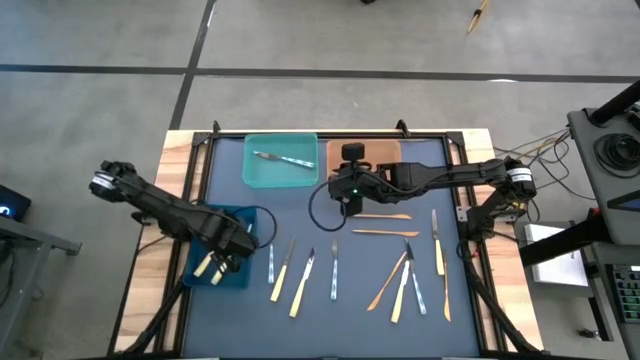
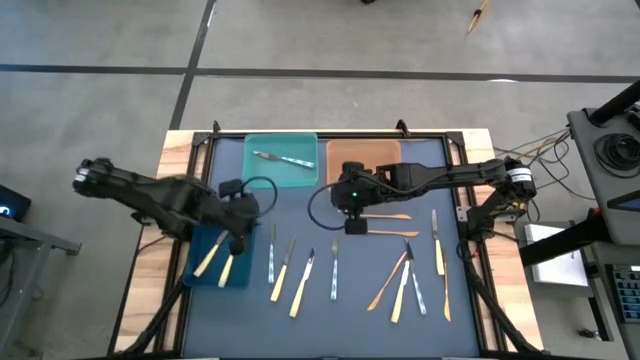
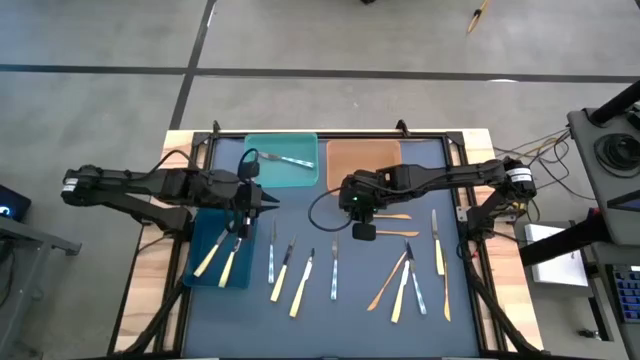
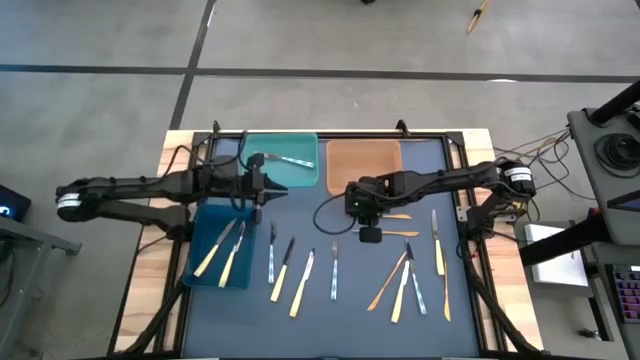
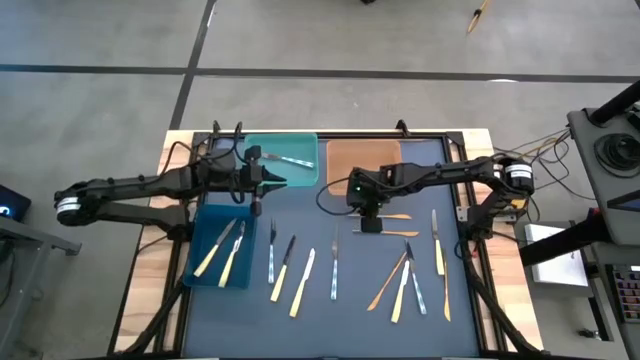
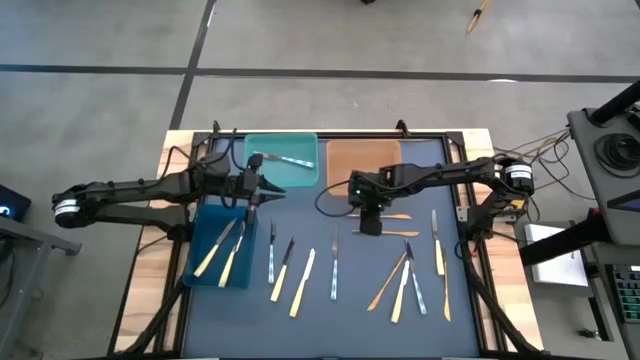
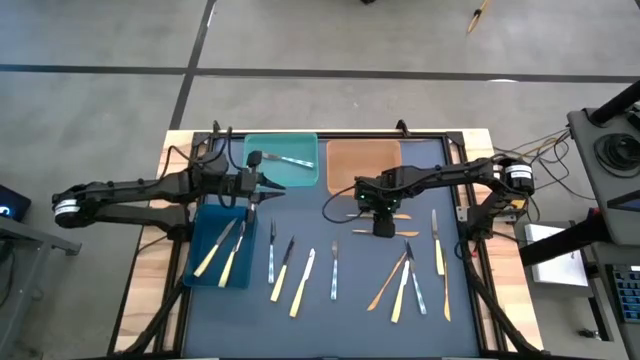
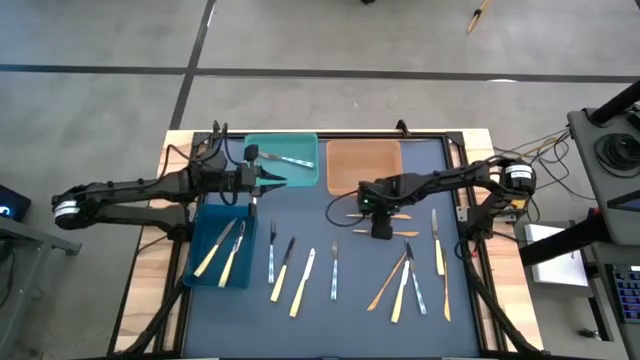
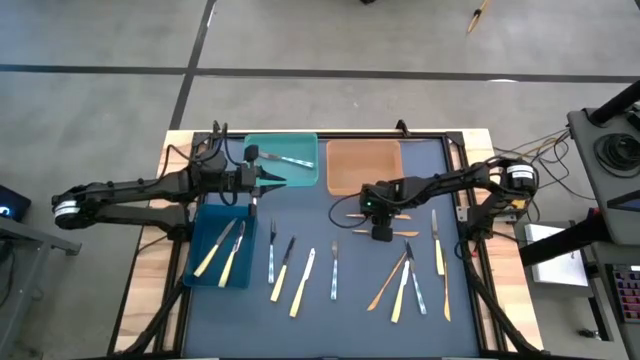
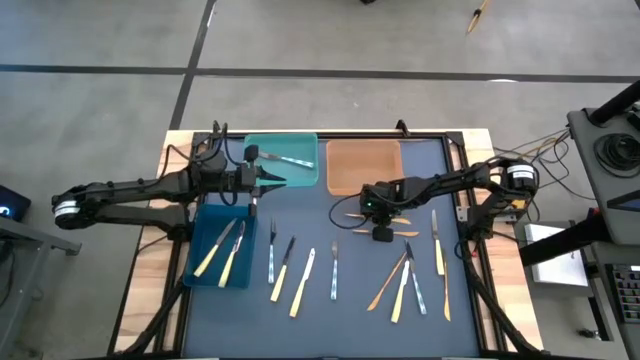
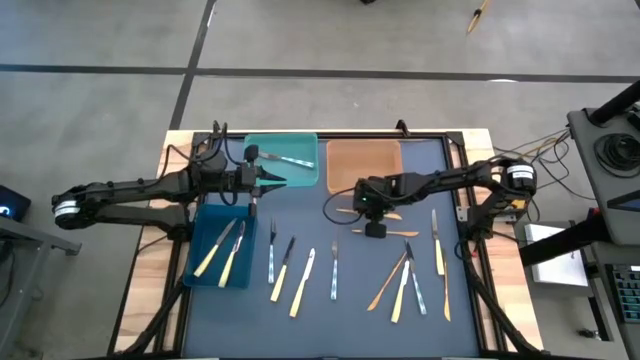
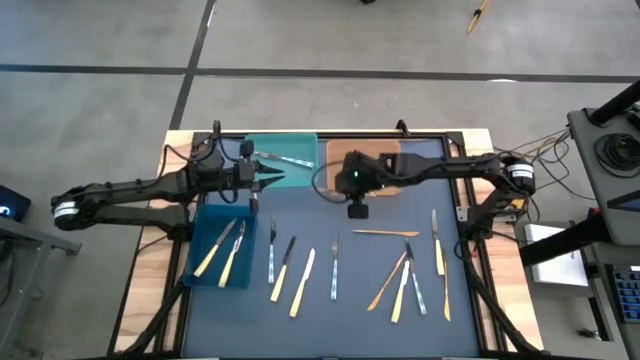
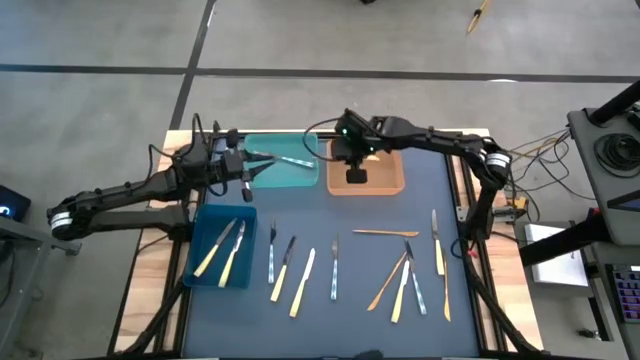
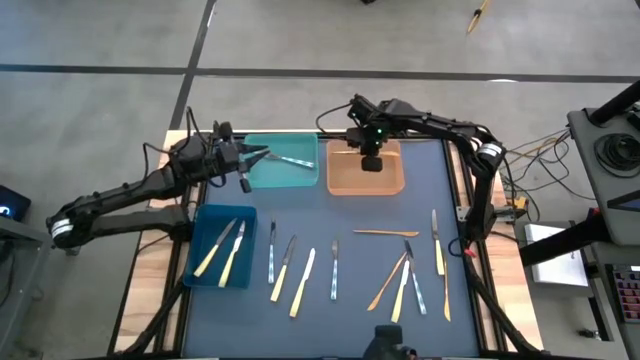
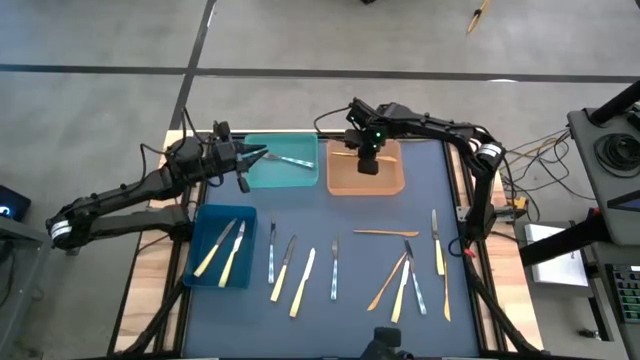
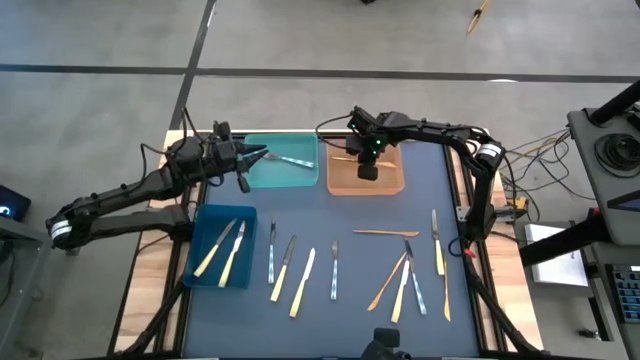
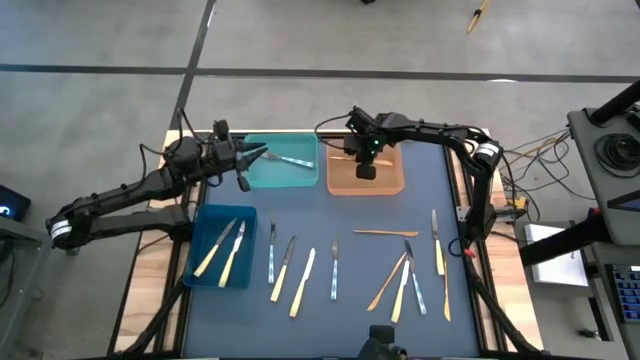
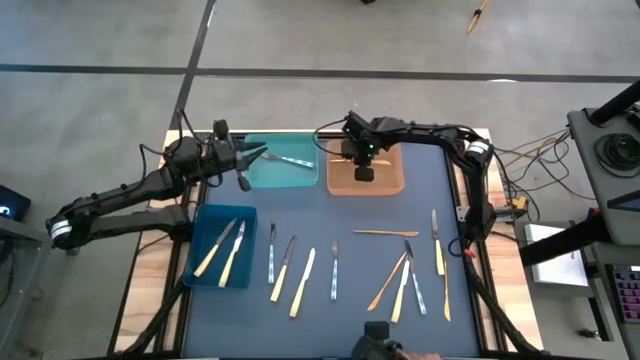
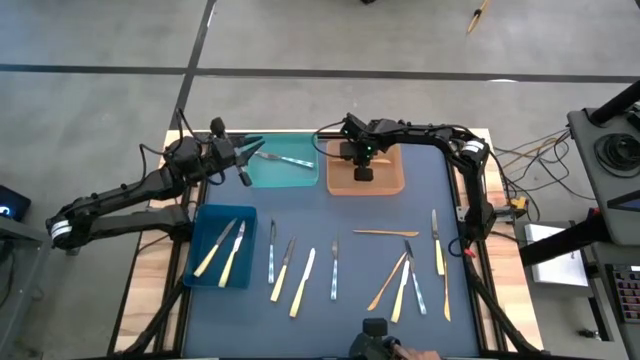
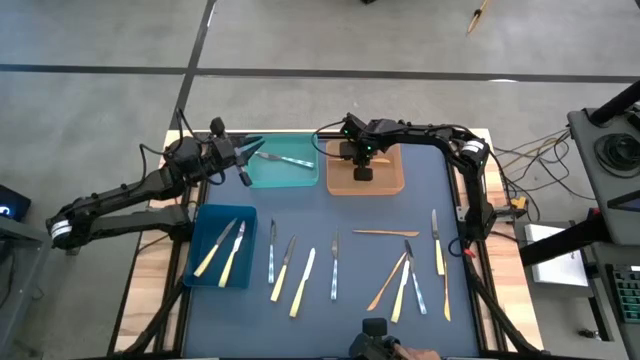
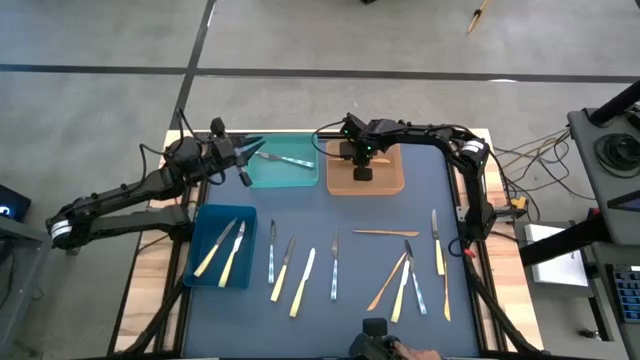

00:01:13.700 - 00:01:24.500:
Task: Sort silverware by color (type)
Put the golden knife into the orange bin

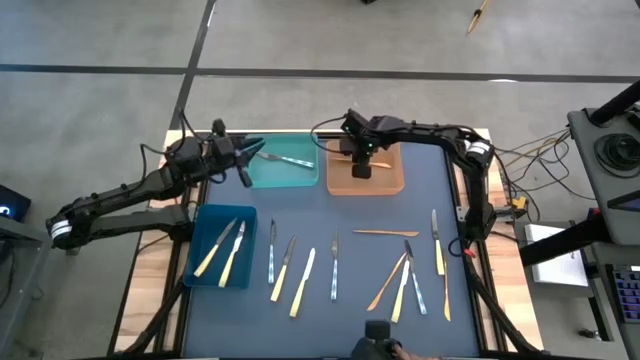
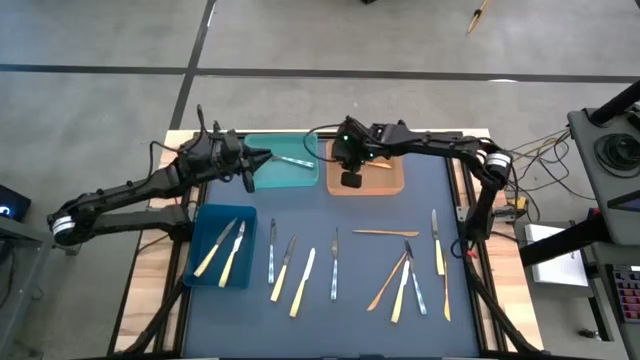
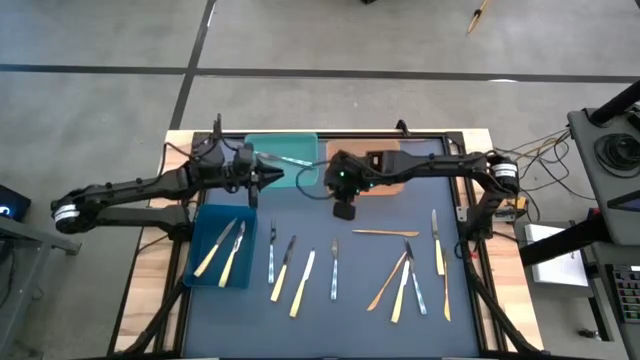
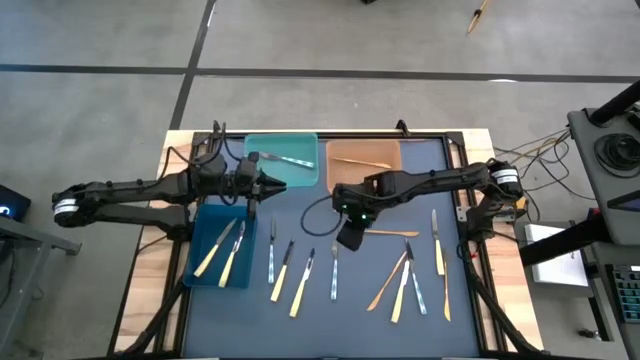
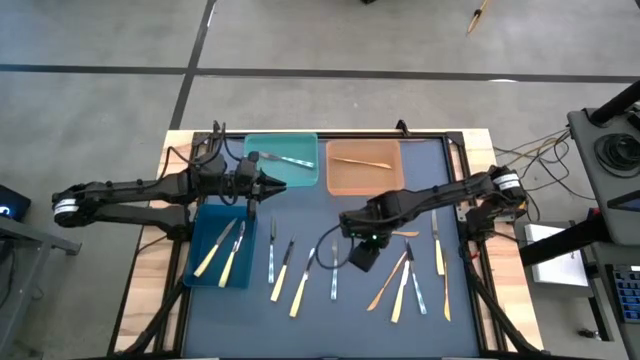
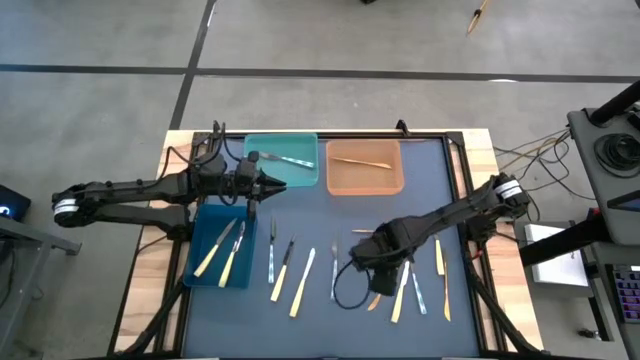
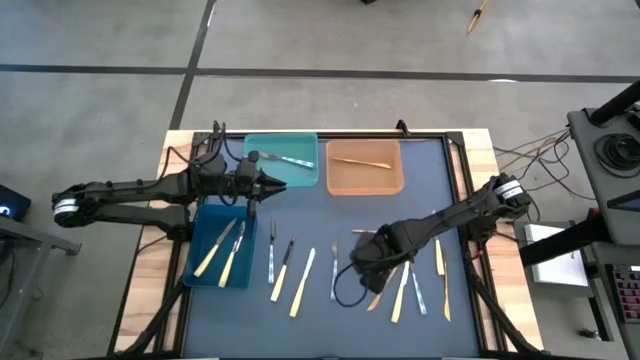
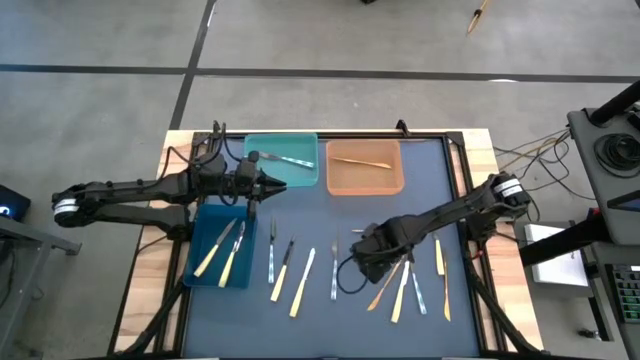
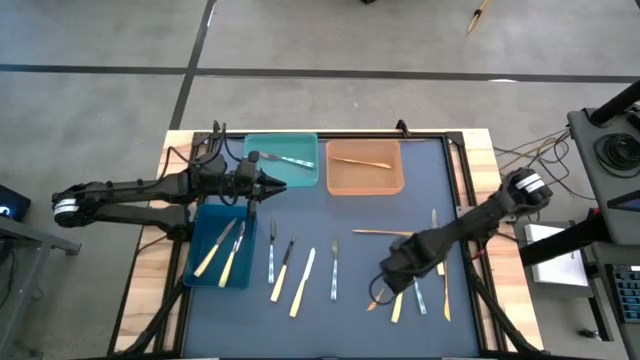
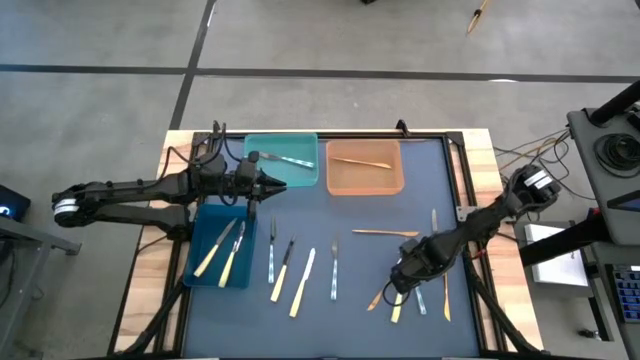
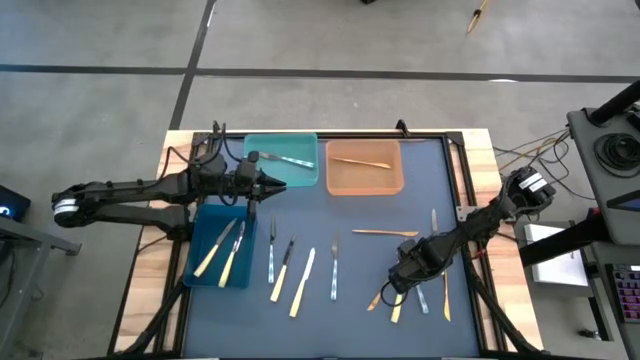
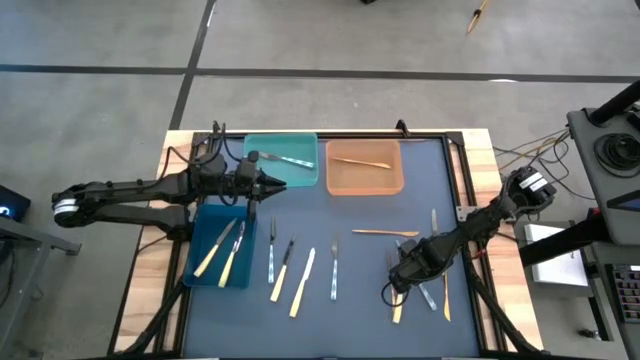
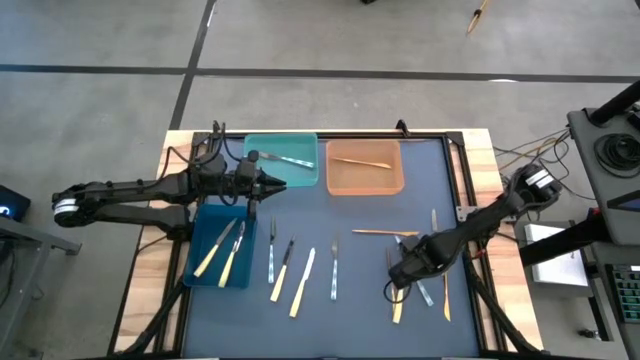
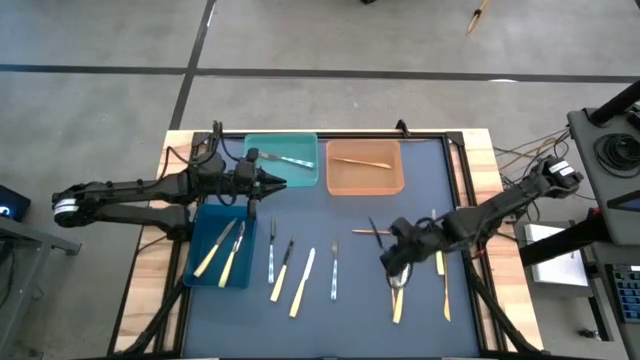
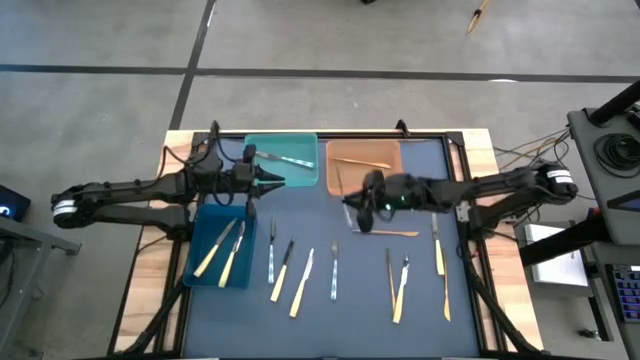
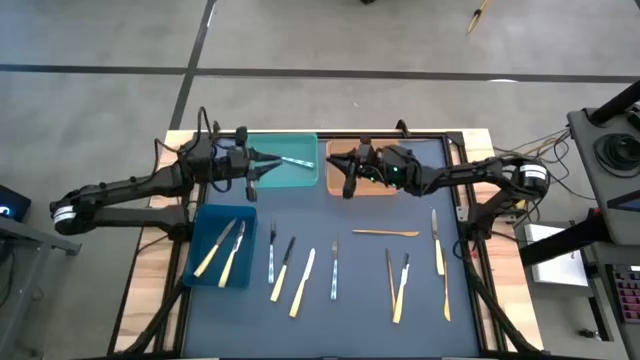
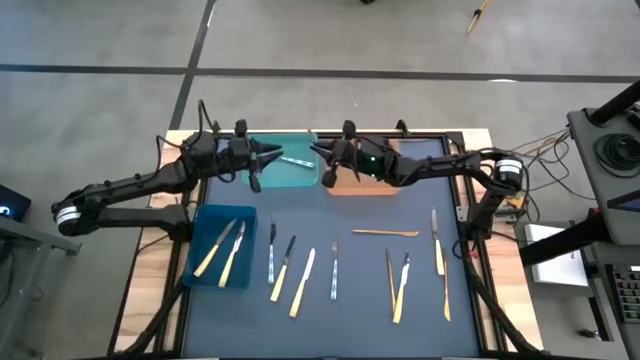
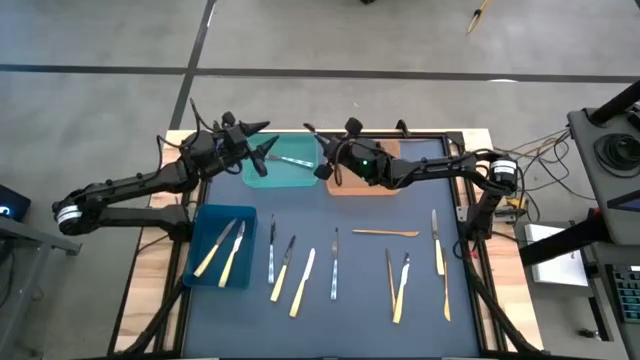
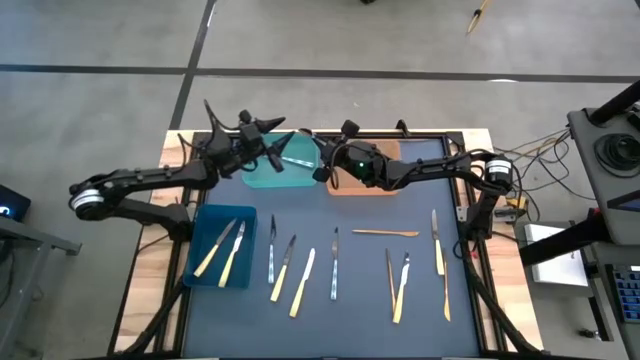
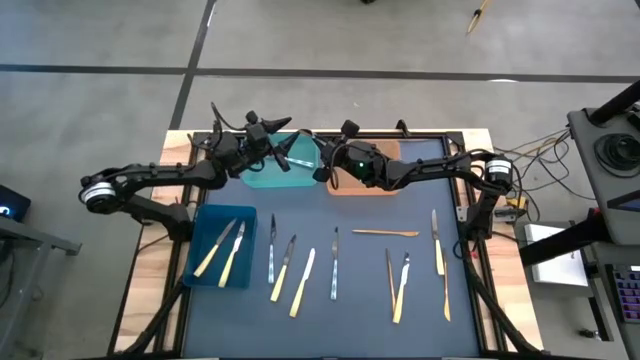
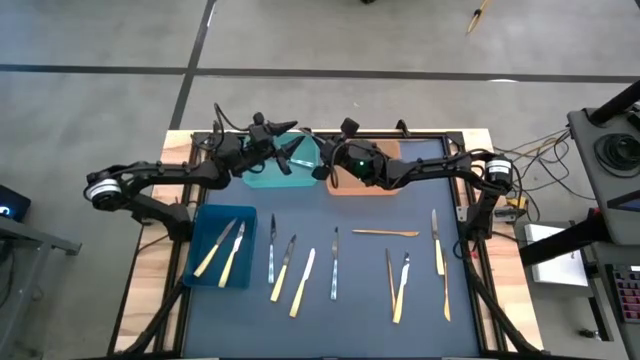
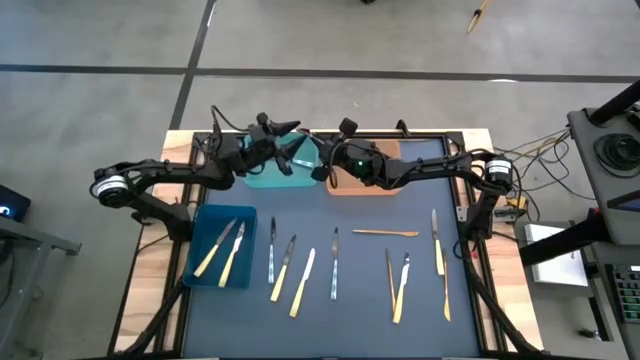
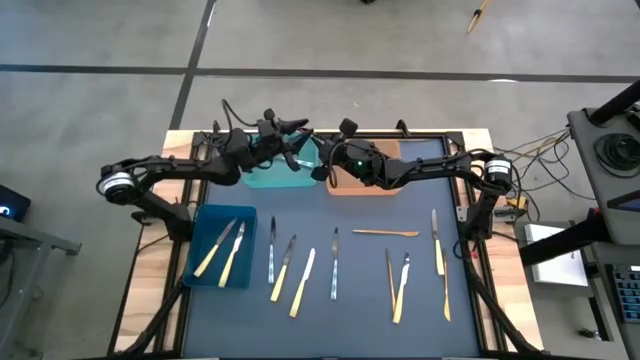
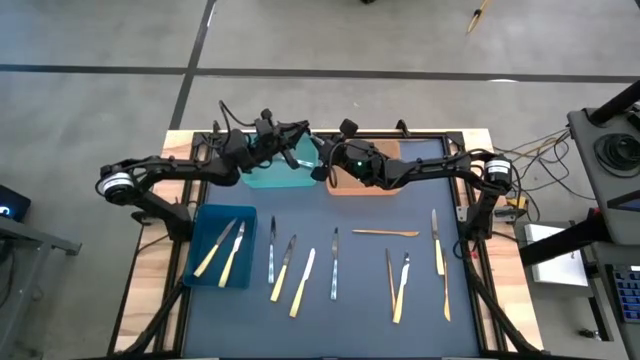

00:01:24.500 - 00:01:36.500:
Put the white knife into the light blue bin
